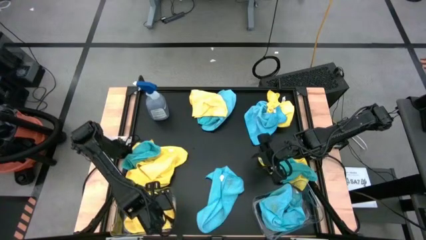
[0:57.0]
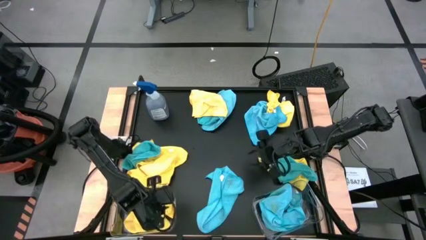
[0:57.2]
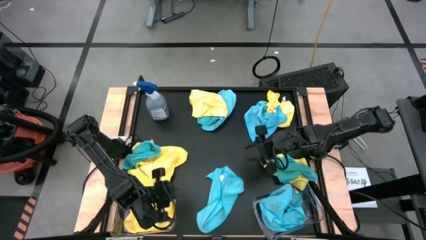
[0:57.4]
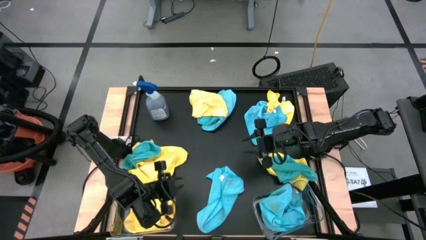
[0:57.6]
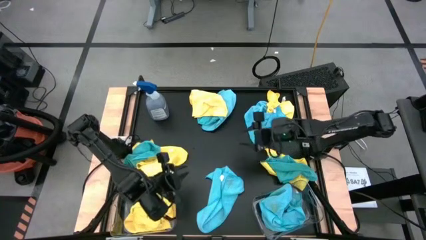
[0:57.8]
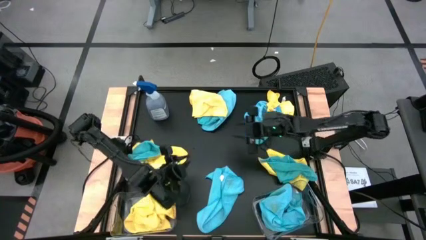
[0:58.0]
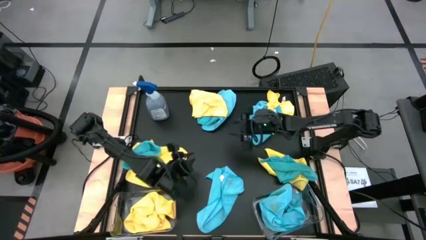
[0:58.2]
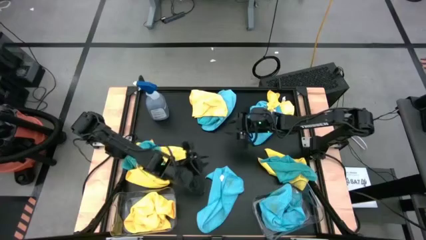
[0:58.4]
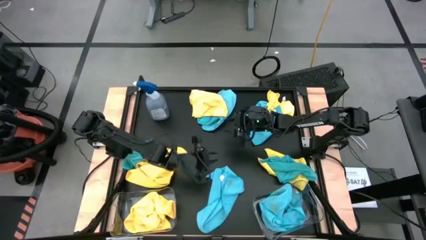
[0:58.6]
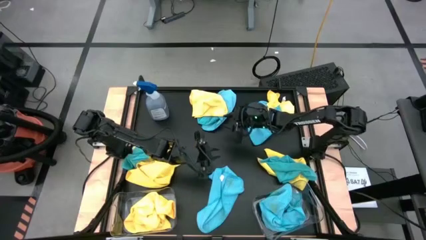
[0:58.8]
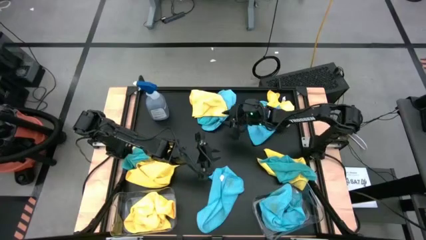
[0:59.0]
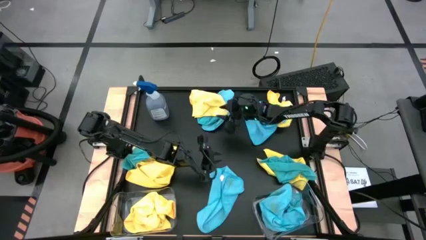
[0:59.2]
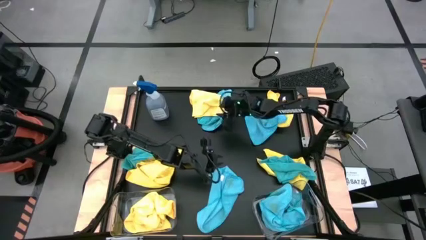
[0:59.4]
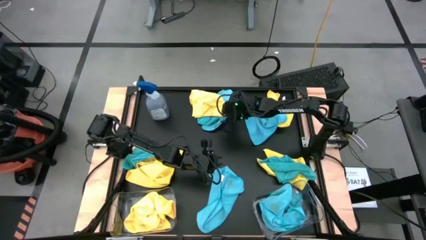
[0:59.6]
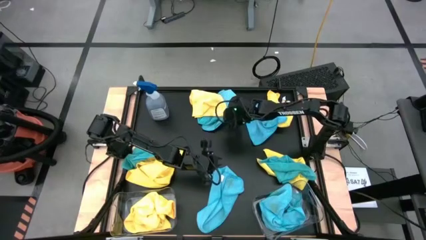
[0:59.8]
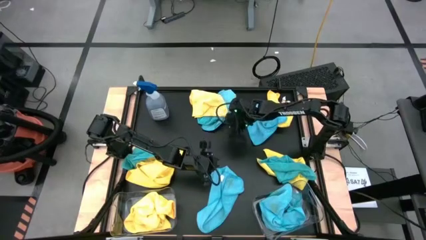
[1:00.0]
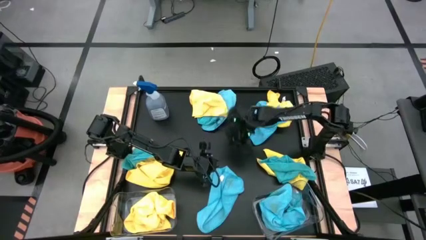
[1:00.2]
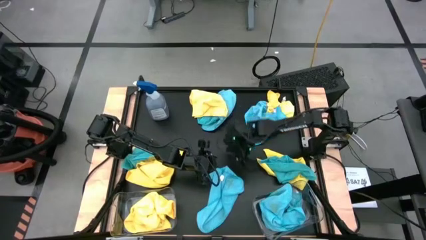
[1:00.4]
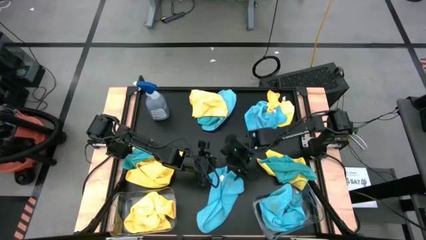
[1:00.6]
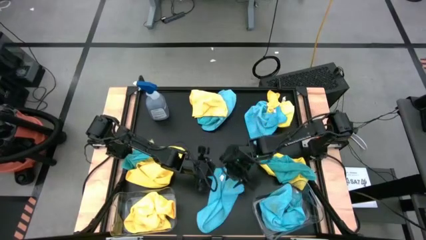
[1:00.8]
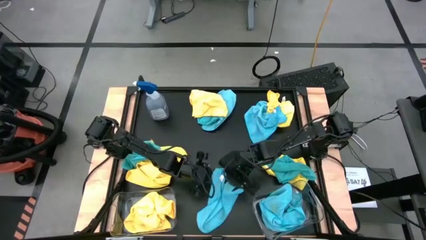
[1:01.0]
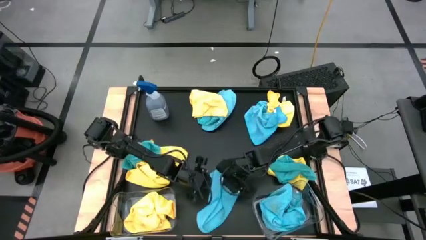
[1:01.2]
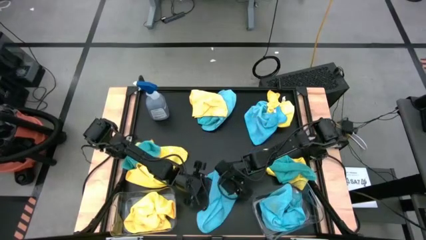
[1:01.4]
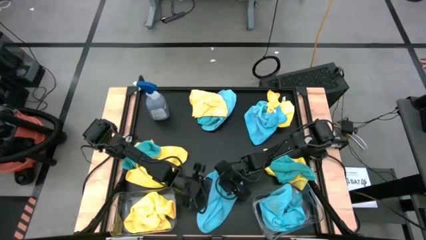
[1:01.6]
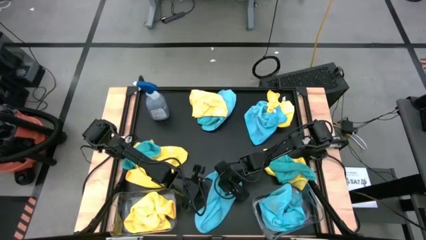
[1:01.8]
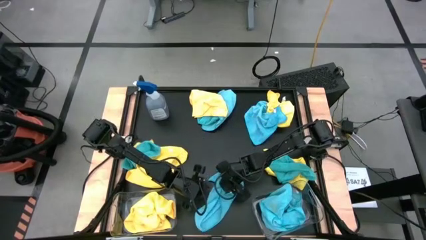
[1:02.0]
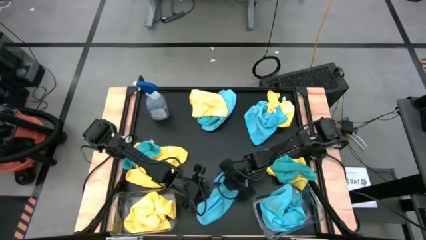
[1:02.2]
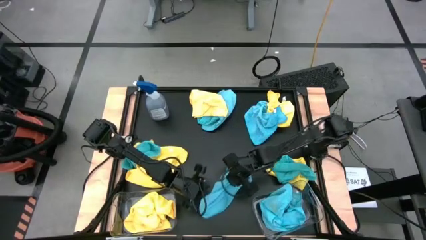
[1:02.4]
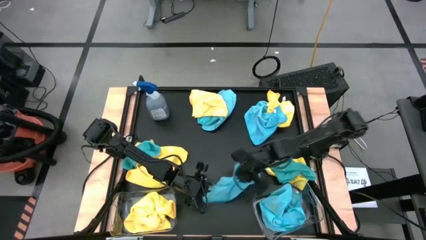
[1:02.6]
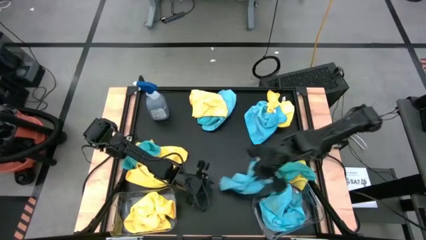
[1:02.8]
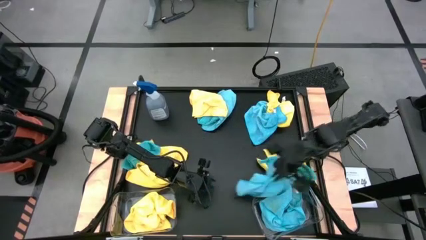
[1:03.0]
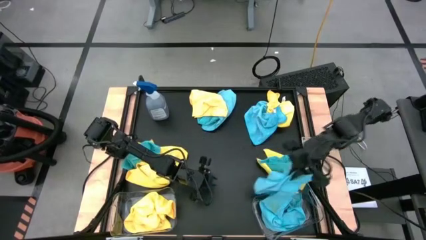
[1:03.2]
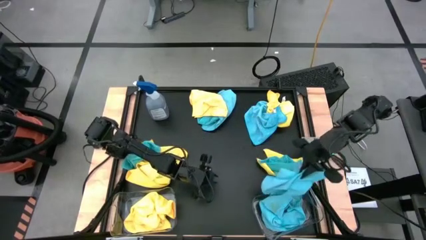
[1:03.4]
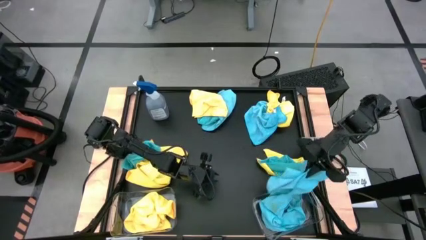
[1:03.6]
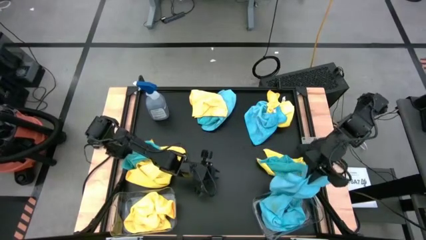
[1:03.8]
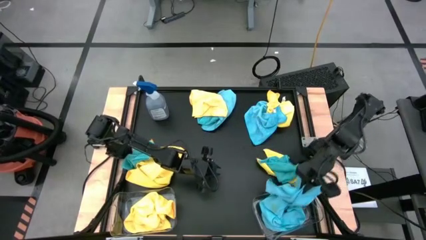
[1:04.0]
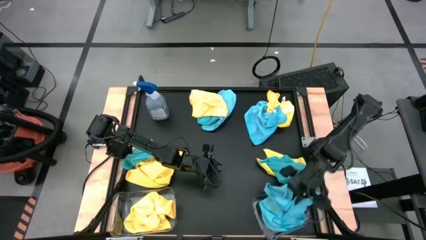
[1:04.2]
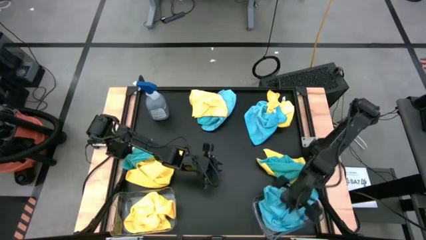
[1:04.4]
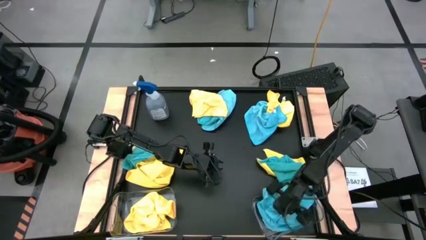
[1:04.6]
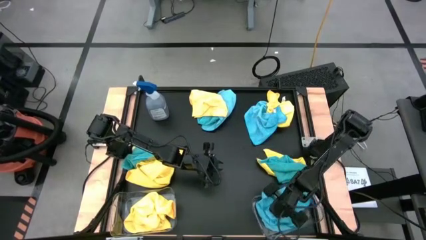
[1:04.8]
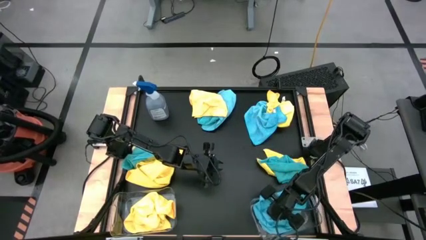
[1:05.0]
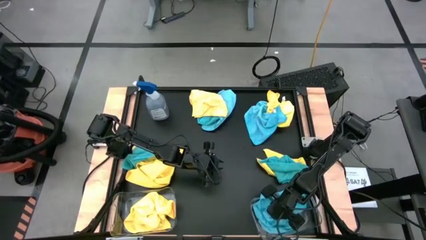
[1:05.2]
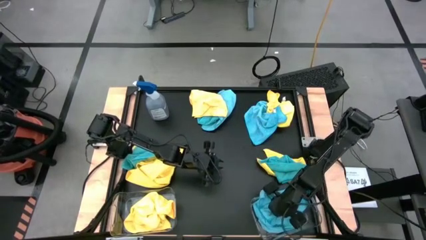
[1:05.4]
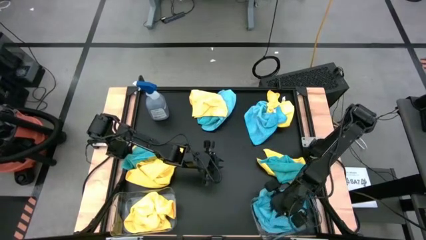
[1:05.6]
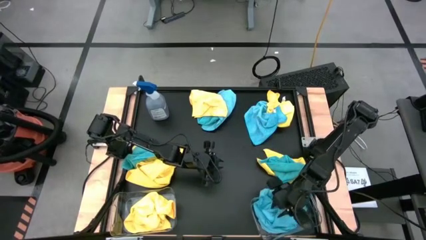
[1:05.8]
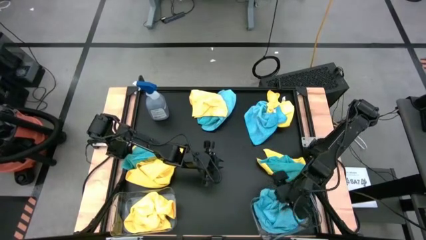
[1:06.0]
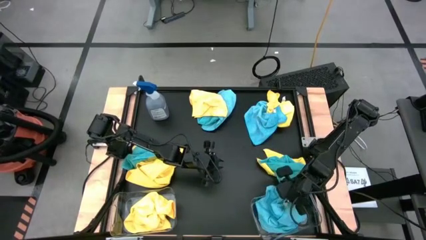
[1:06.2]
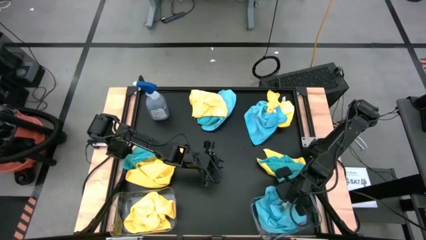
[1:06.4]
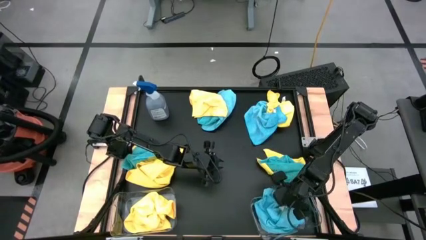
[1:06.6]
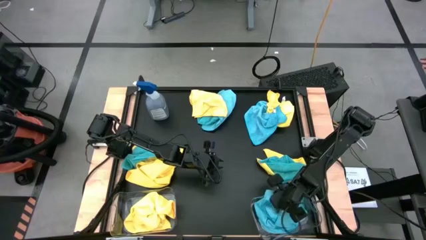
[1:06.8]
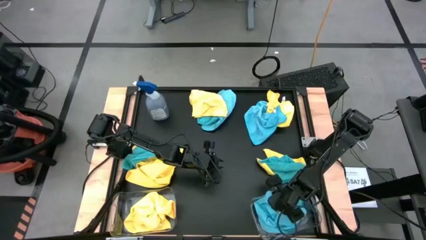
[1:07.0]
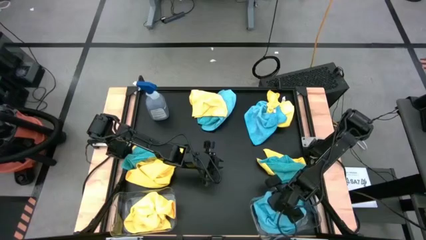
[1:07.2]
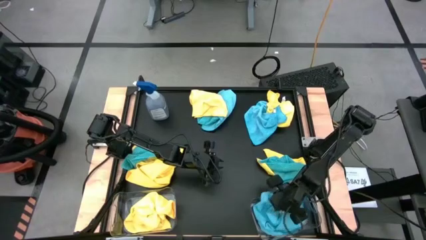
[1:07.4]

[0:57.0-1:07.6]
Task: Sort microfiber towel by color & place in baskets
Put the blue towel into the right transparent bin

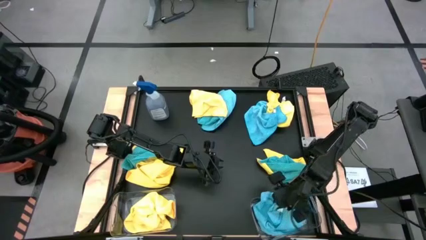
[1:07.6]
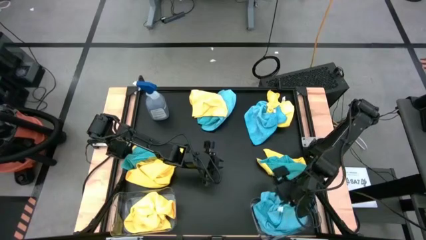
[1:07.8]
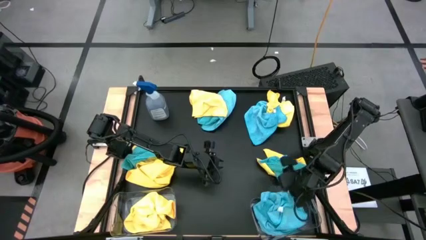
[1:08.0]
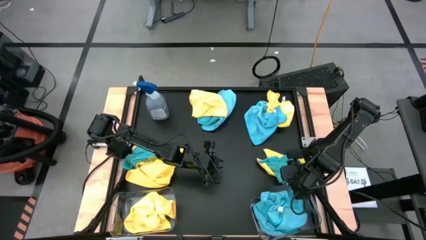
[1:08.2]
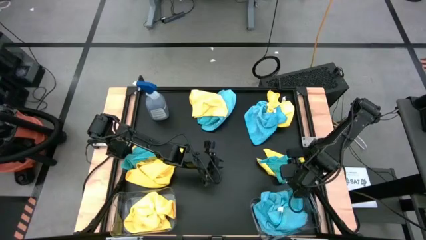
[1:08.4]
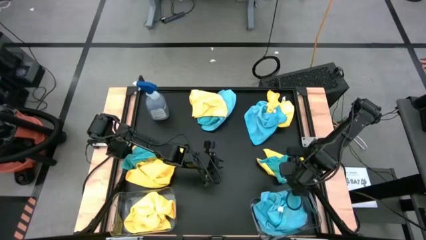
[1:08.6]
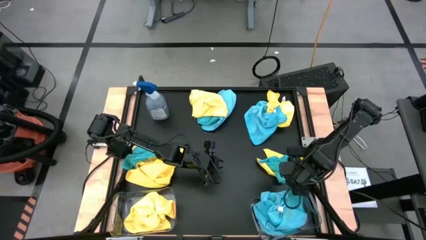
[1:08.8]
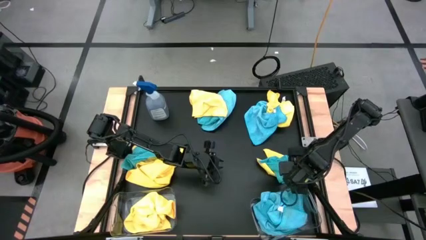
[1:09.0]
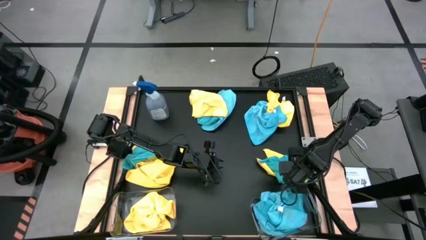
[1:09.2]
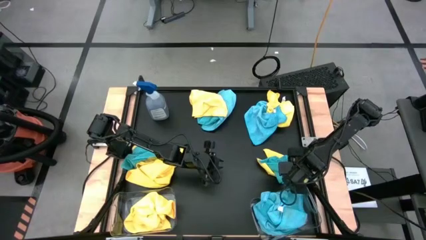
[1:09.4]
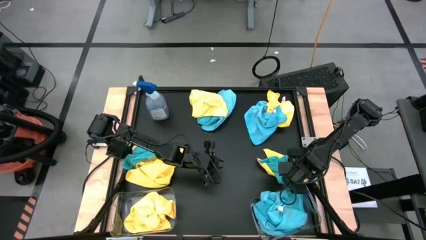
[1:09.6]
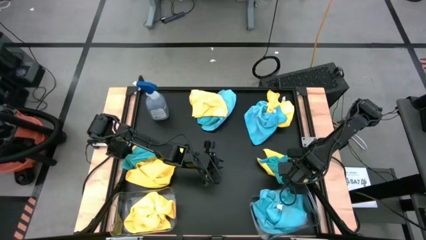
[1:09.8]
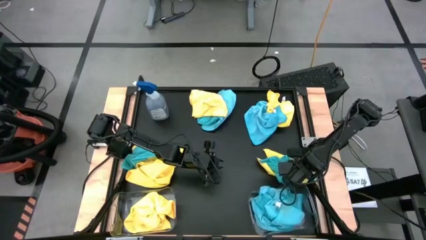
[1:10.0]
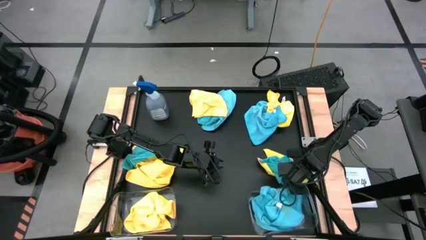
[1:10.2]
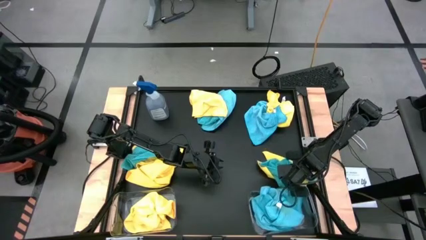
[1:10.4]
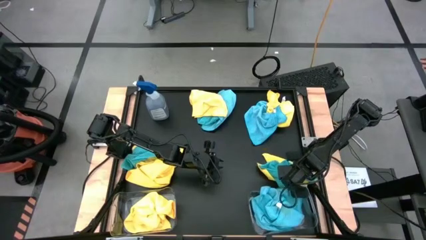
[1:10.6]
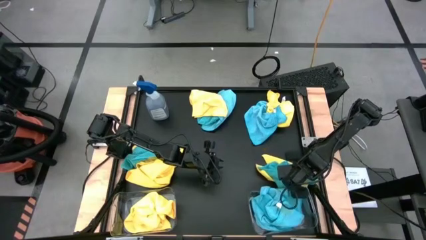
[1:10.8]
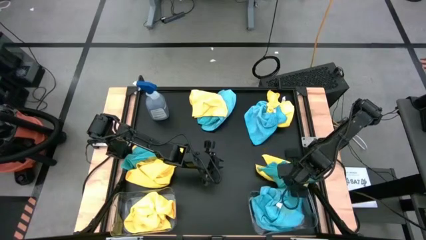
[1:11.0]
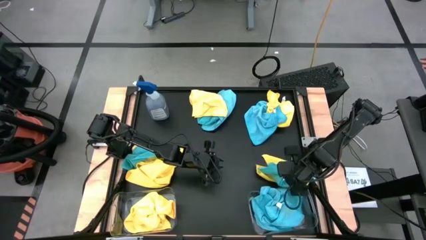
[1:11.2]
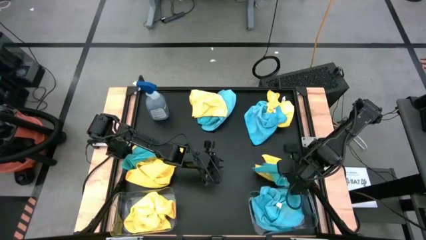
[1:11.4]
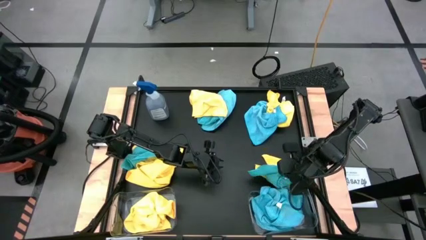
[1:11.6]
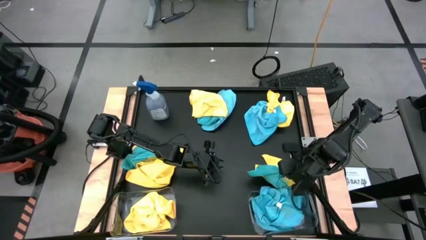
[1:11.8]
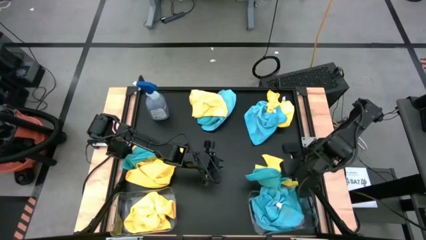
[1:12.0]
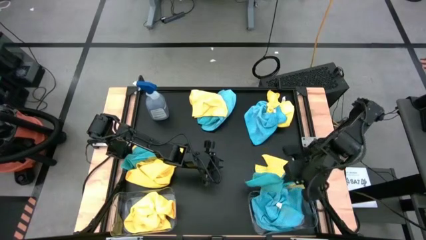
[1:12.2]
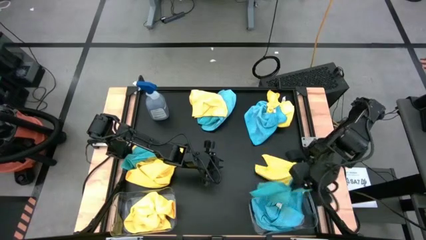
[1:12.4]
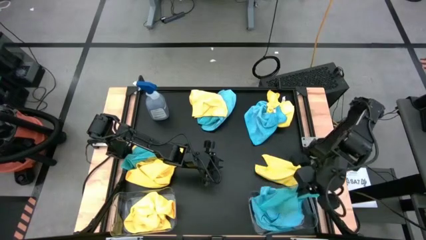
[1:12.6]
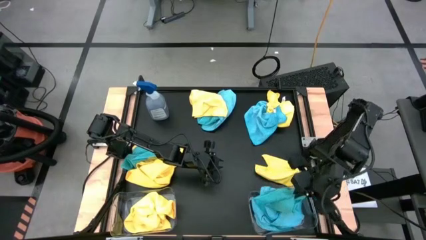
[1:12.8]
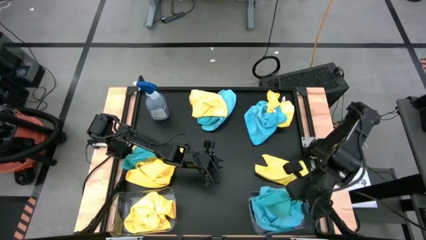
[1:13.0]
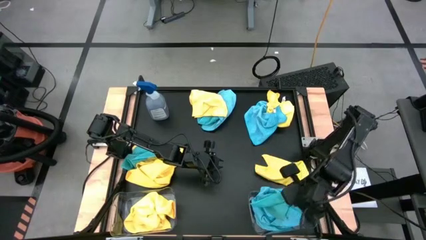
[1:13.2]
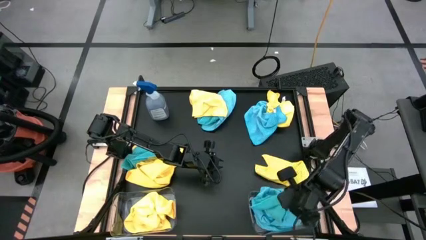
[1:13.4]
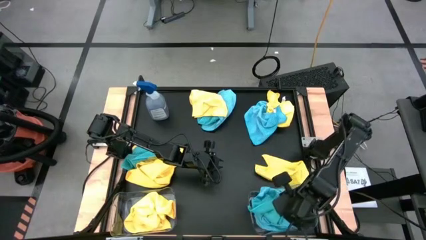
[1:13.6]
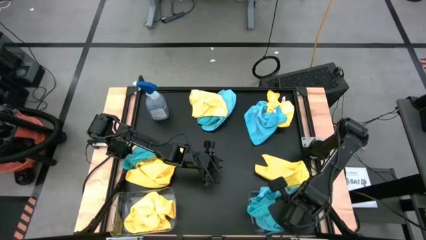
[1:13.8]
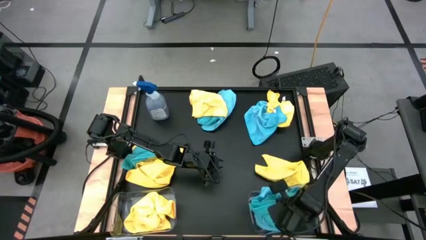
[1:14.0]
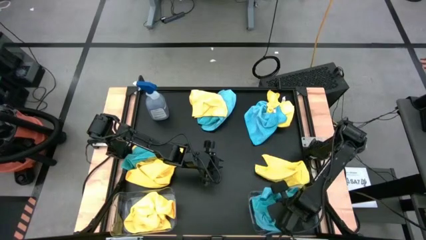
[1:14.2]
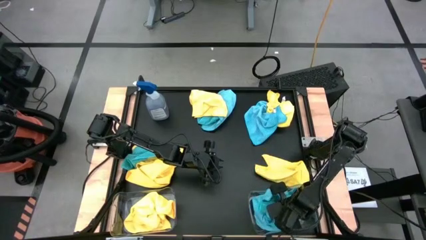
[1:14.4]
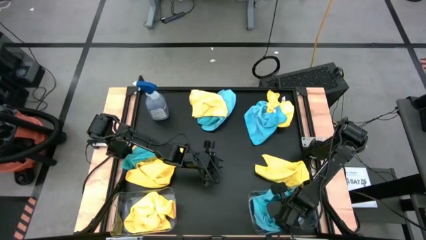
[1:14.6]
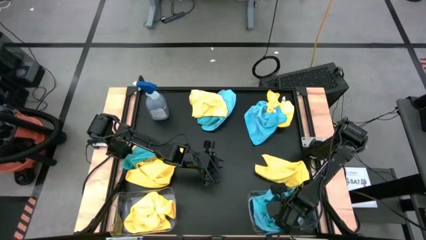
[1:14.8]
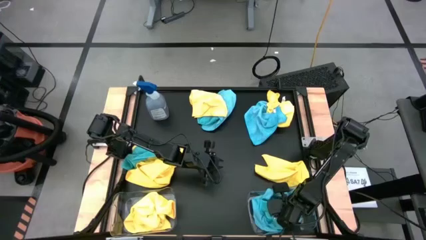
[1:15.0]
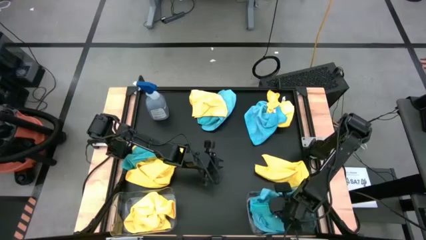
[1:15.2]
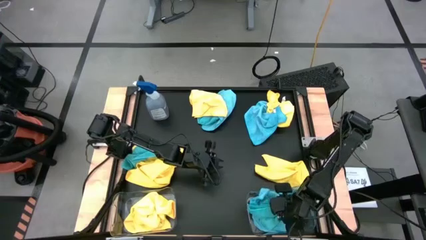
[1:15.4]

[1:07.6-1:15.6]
Put the blue towel into the right transparent bin
